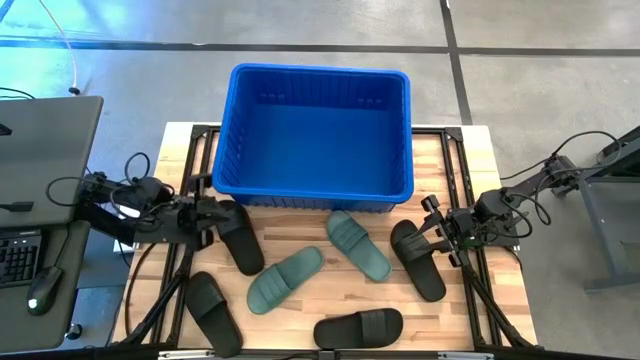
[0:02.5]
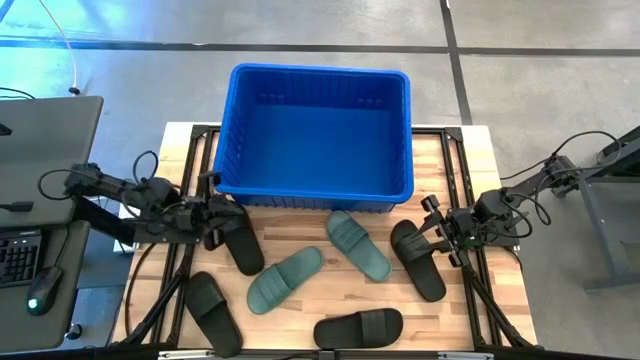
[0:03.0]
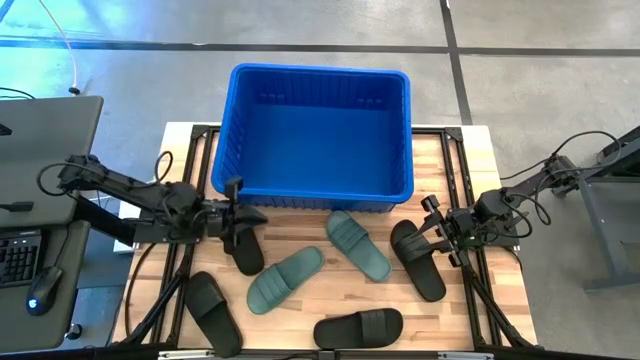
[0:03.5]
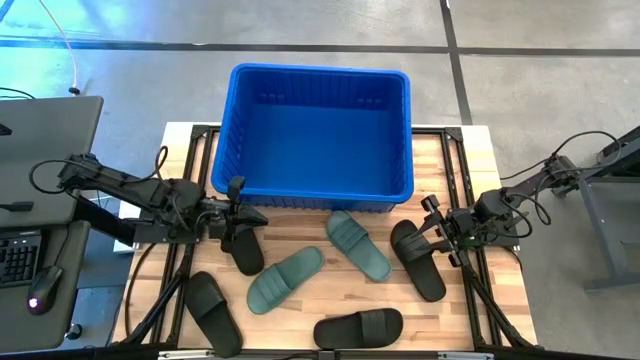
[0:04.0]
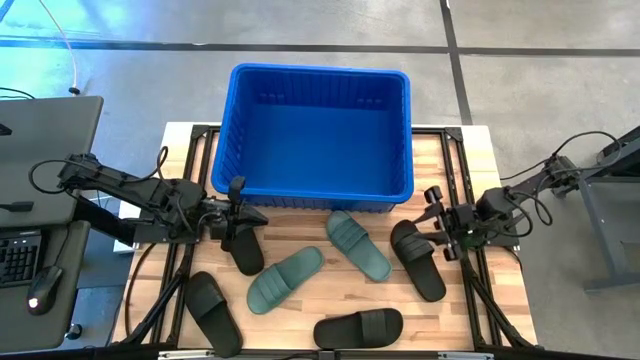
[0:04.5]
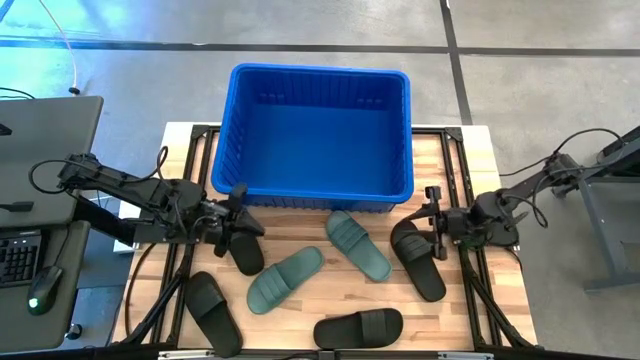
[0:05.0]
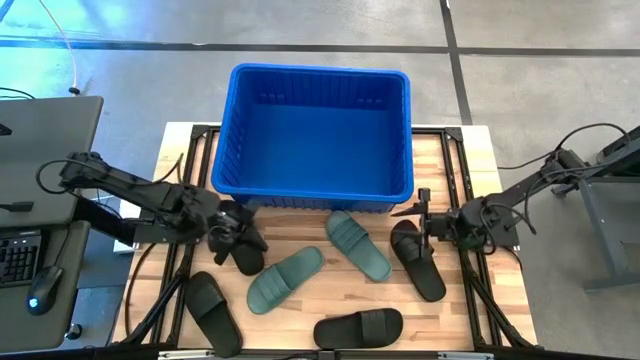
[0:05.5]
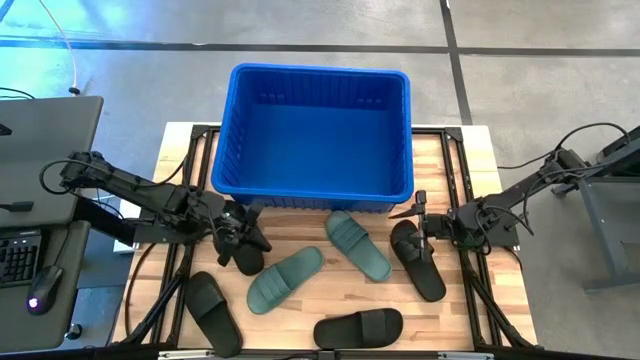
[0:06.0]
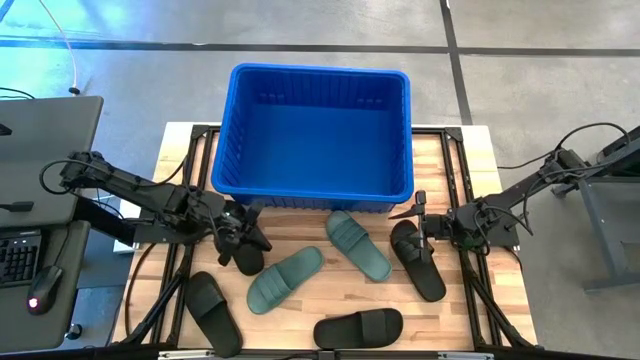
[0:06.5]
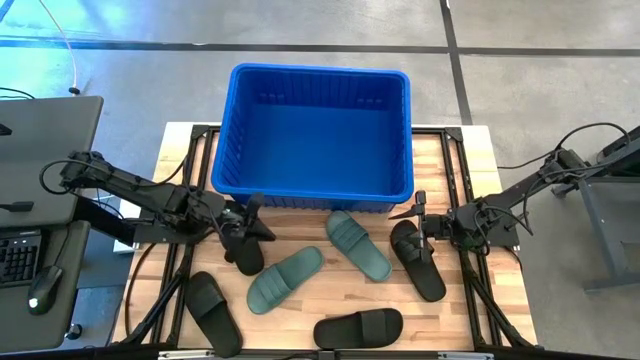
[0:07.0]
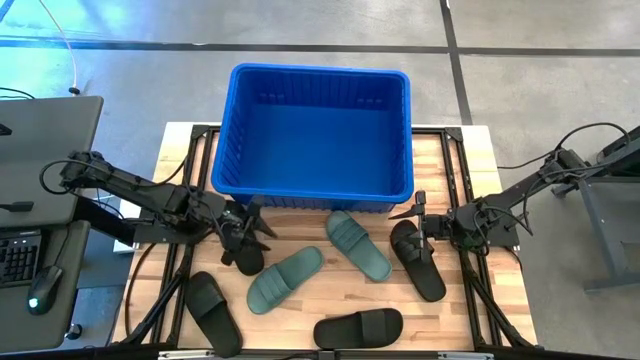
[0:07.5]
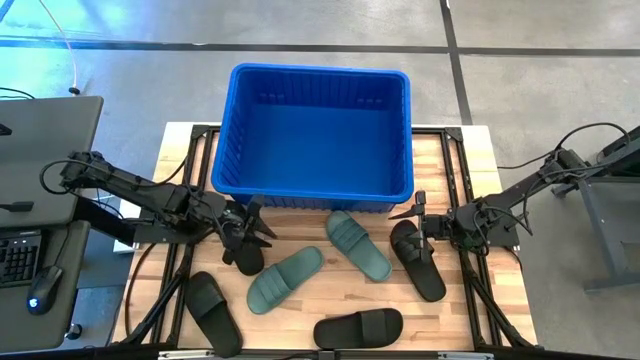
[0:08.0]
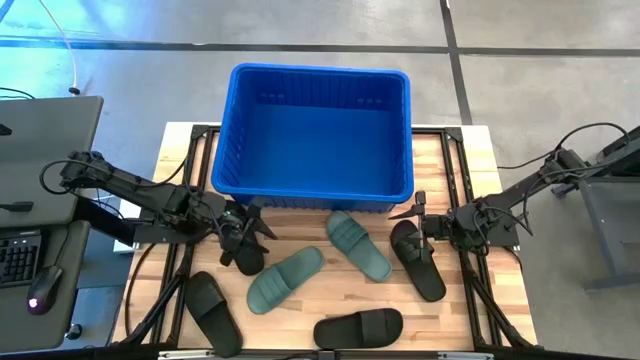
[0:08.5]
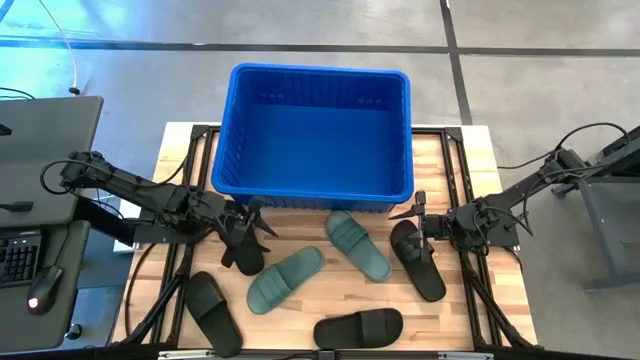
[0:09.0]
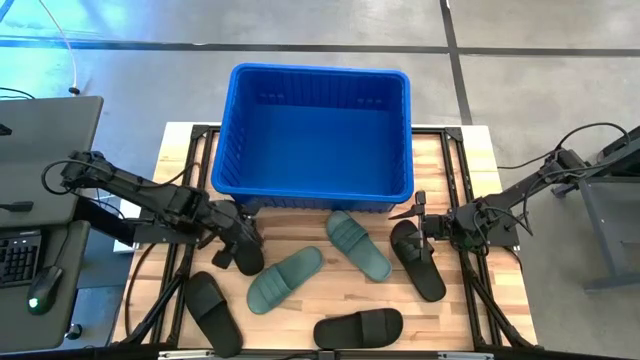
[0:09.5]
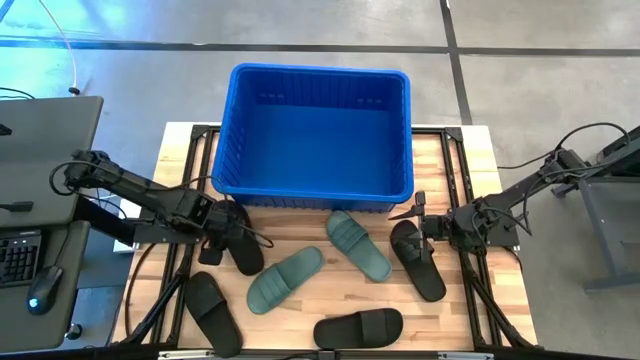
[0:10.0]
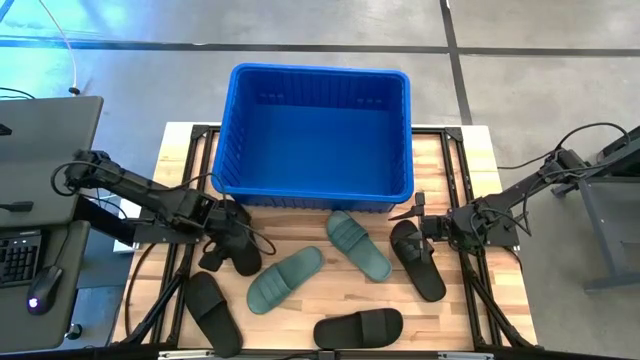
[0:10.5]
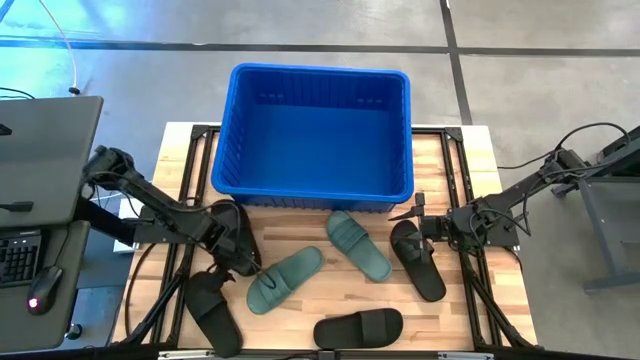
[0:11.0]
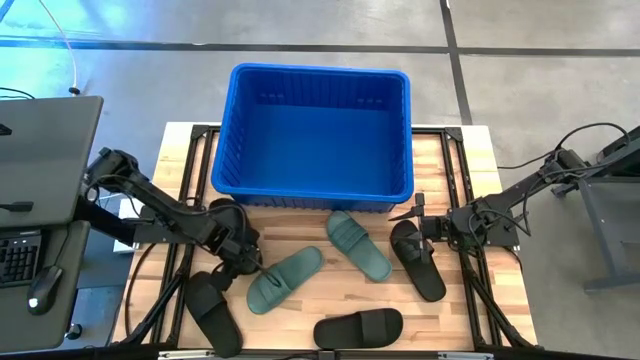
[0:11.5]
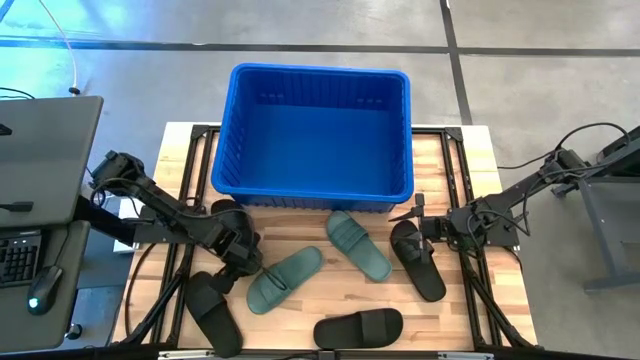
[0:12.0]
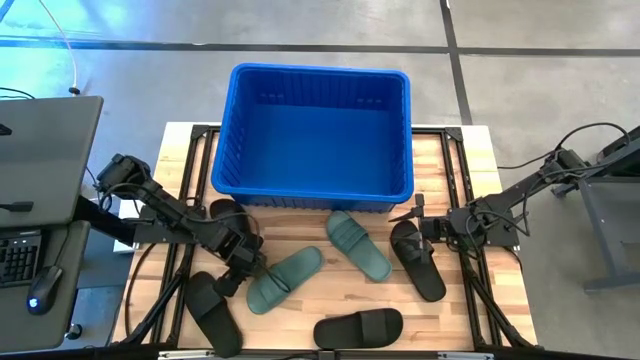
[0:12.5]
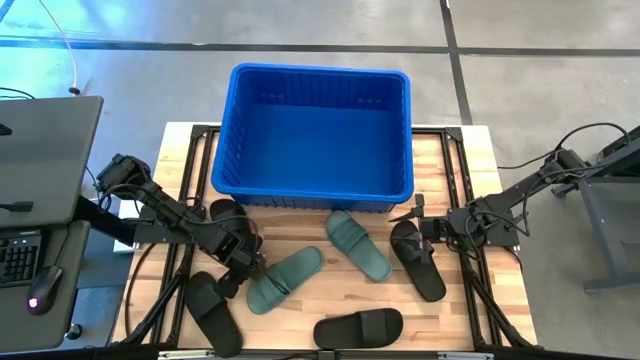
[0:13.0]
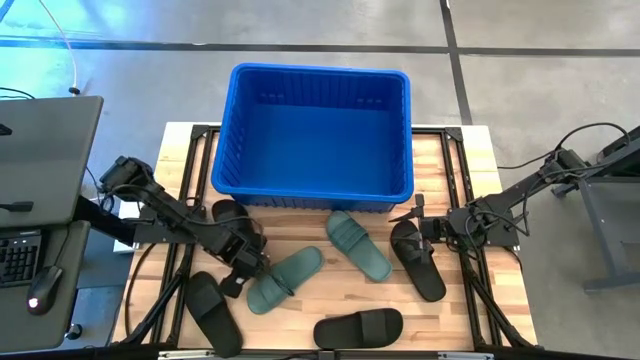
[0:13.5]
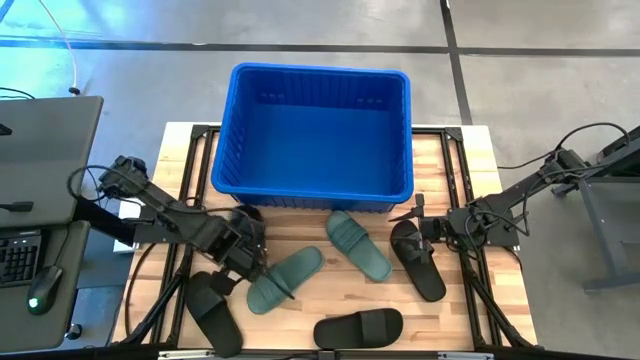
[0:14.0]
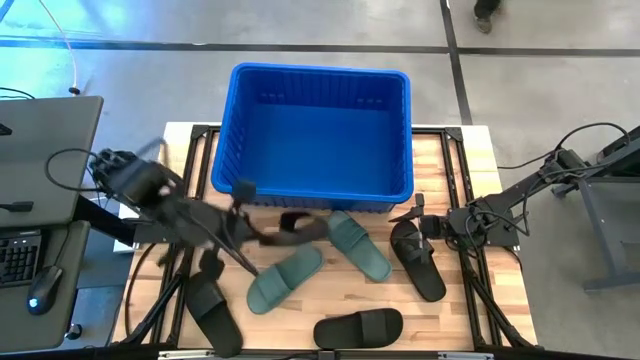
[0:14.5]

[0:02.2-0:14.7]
Task: Pick and place slides into bin
Put the black slide into the blue container

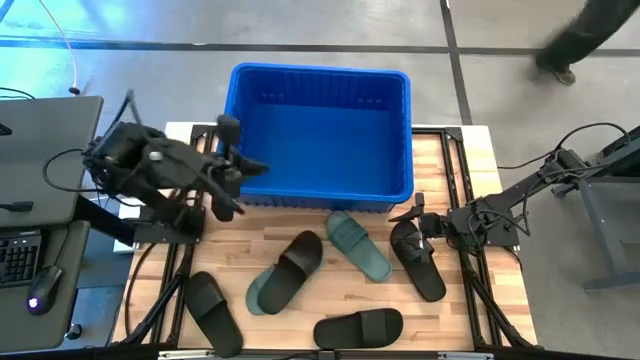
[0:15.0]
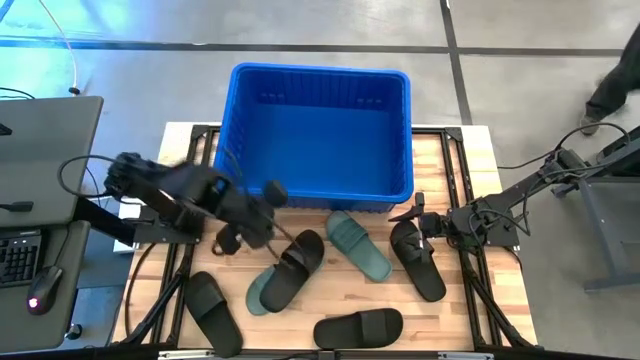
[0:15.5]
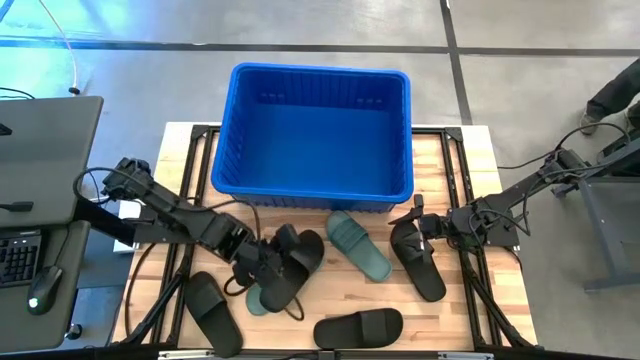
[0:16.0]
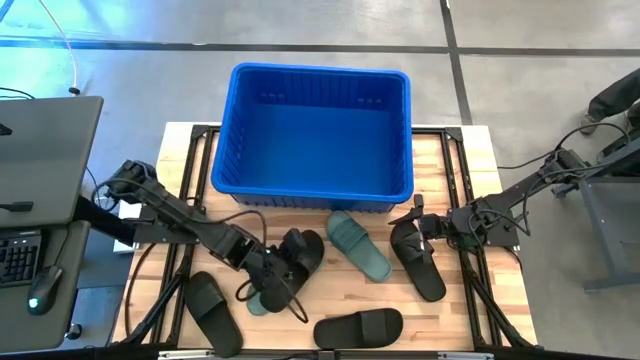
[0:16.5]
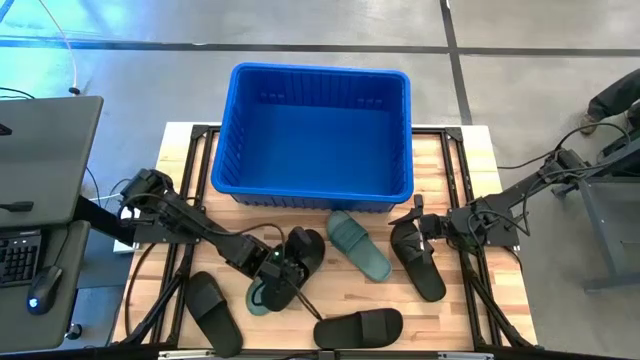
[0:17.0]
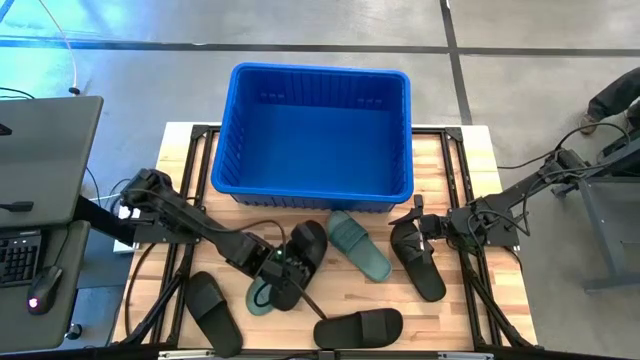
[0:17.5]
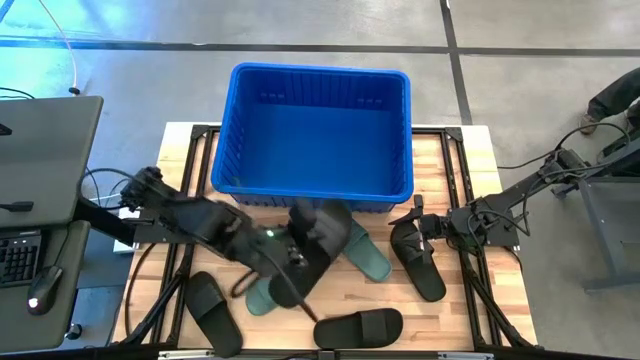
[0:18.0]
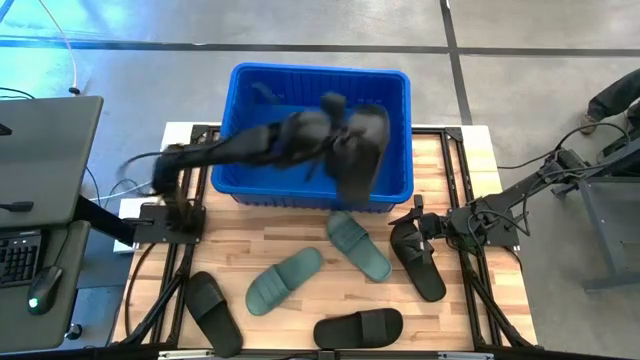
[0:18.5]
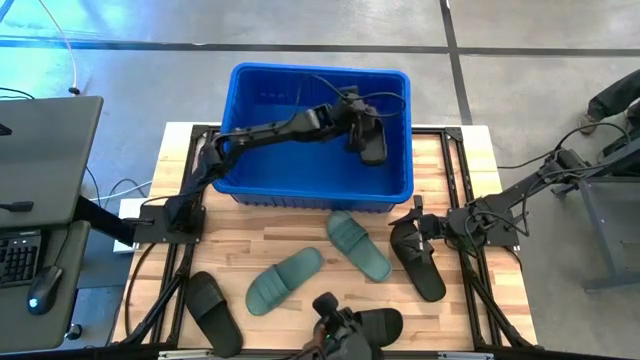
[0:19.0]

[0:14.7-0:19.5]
Put the black slide into the blue container

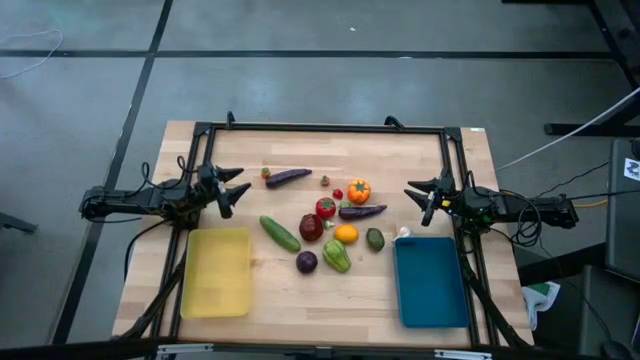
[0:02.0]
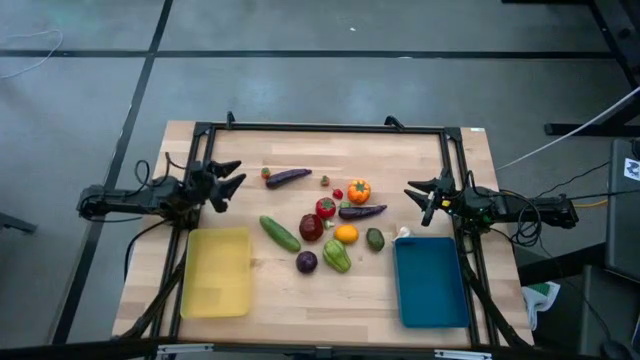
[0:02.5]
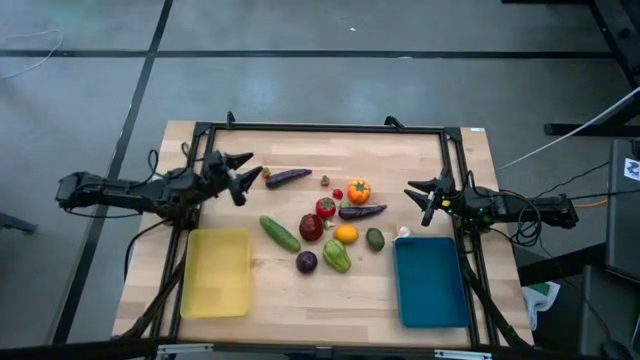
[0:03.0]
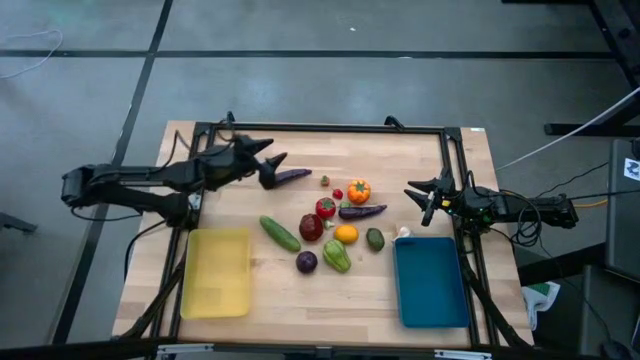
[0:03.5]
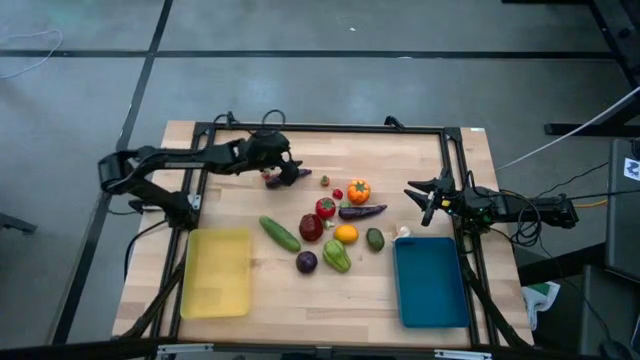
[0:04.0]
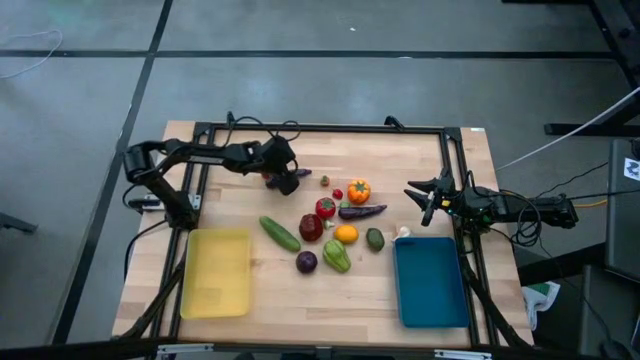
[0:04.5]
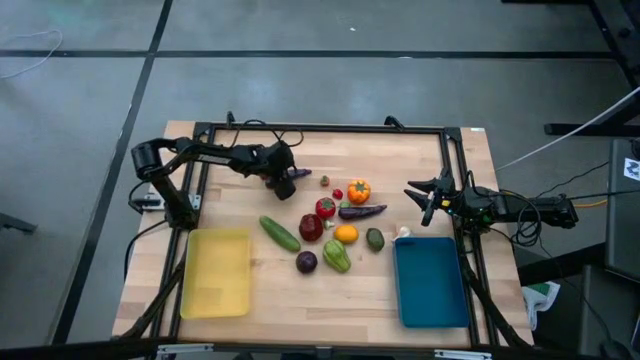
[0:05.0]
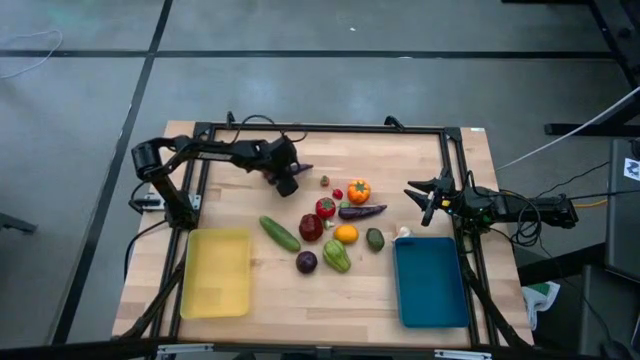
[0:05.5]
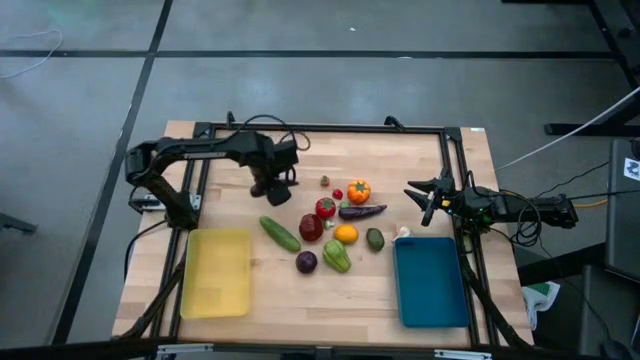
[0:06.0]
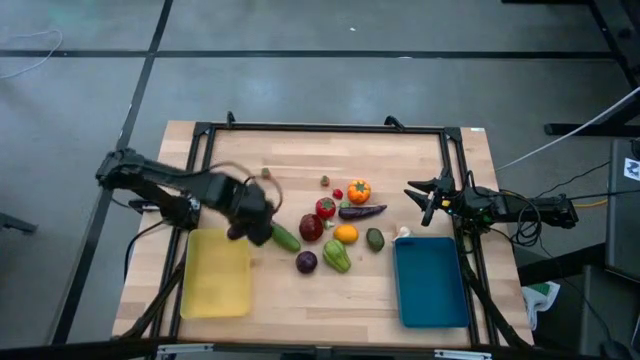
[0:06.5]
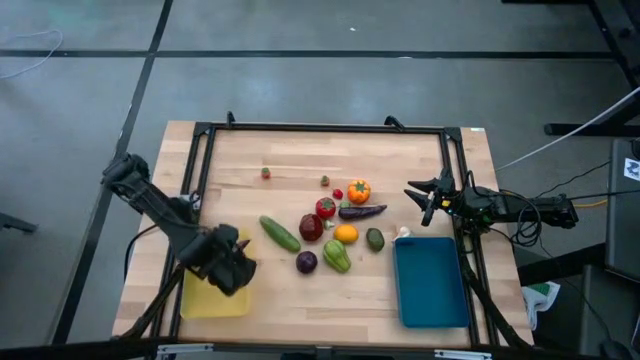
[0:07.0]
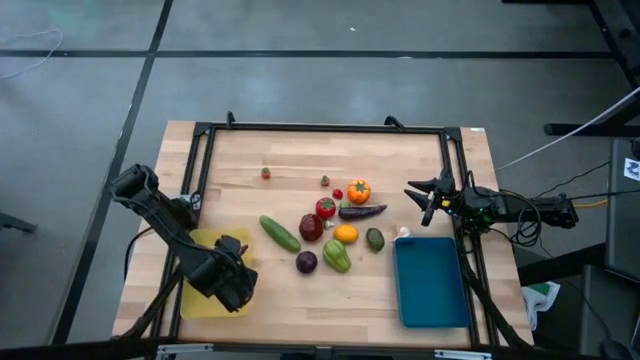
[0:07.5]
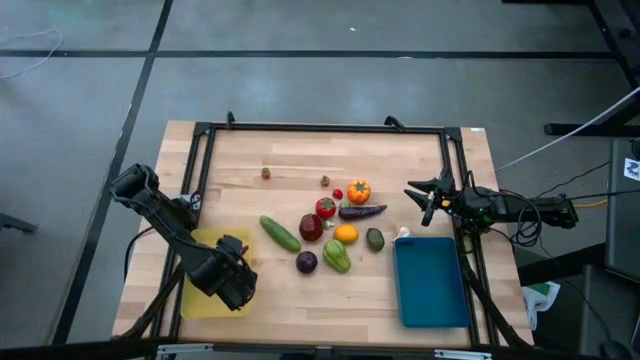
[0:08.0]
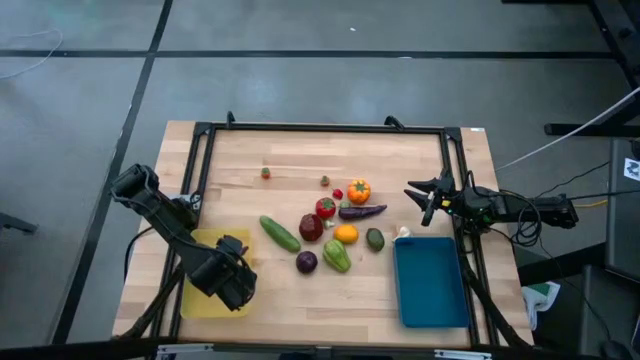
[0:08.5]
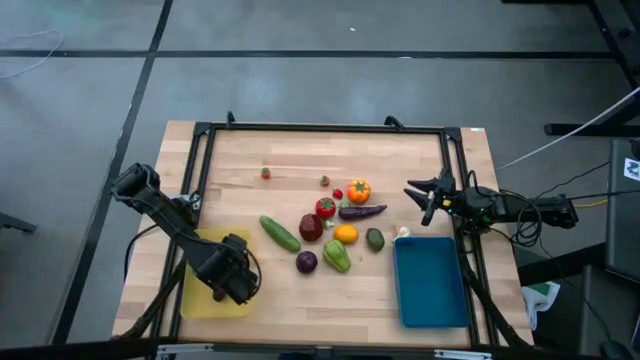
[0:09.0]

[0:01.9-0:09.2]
Task: Sort produce into baskets
Put the top eggplant into the yellow bin
